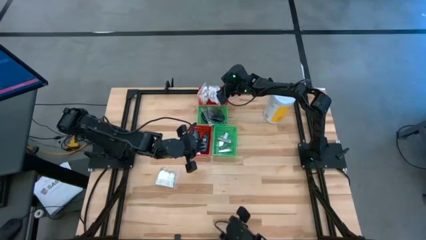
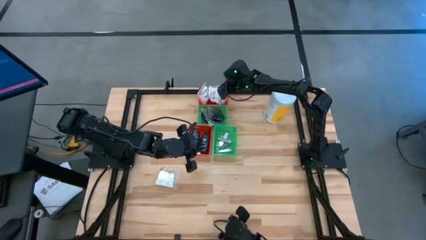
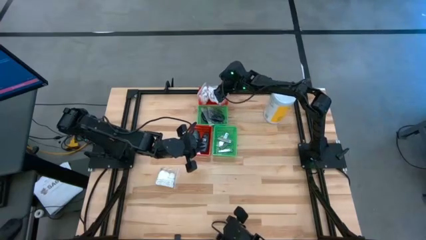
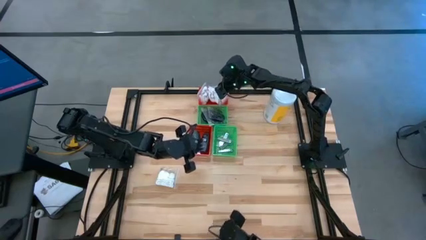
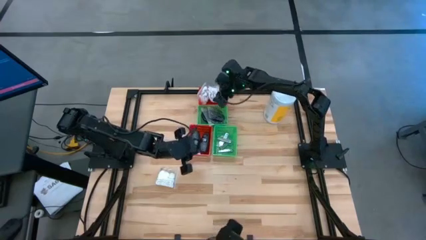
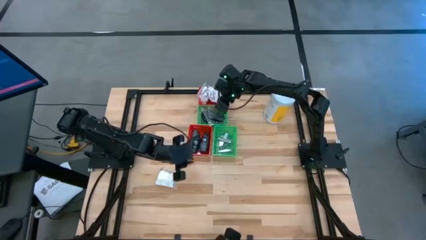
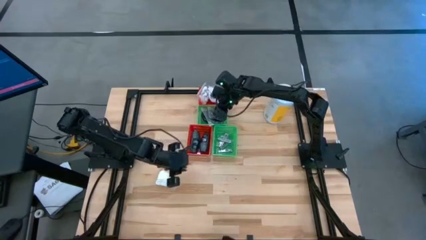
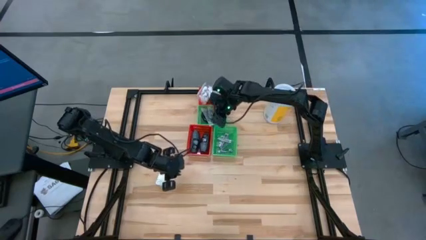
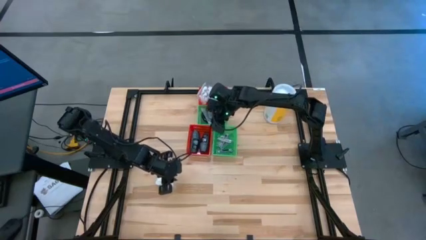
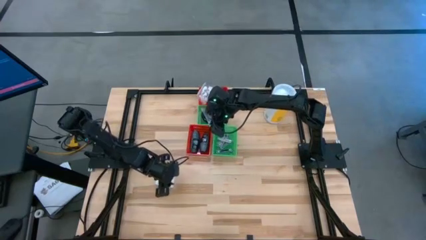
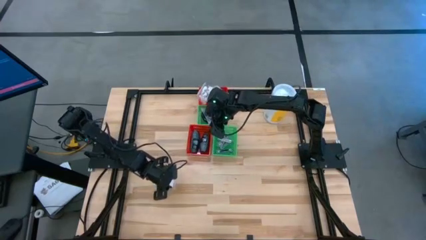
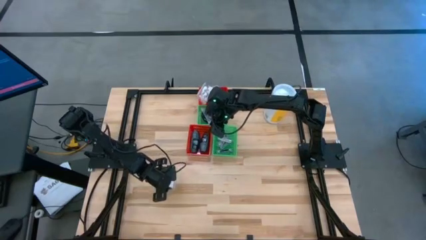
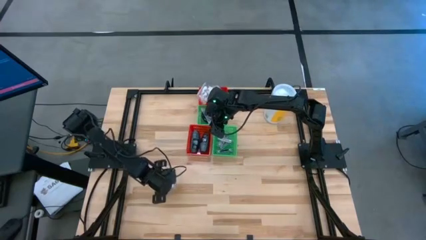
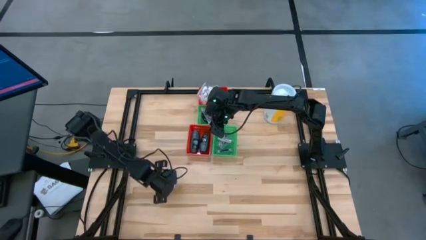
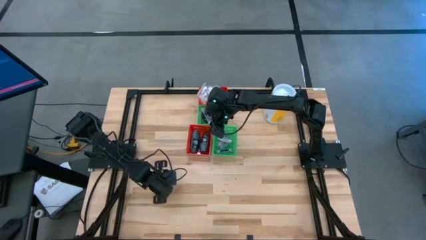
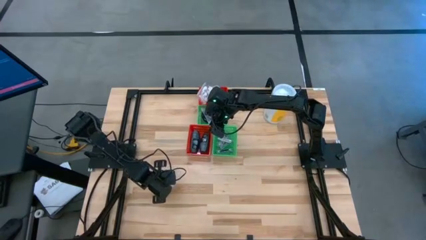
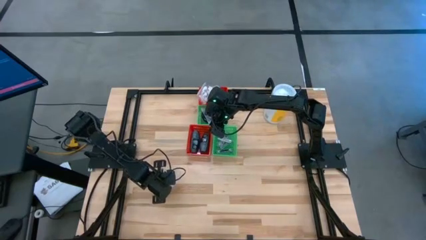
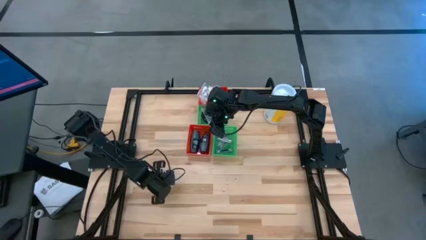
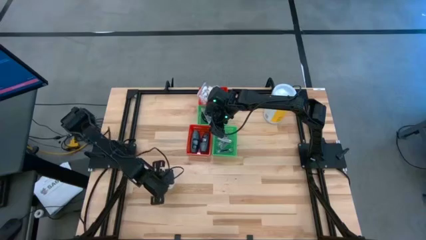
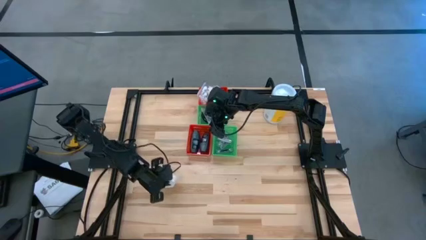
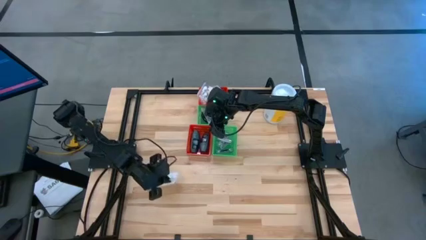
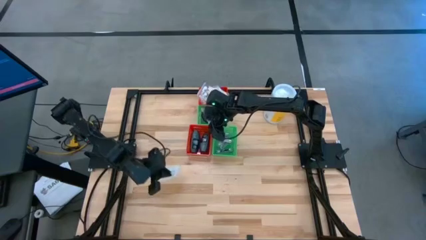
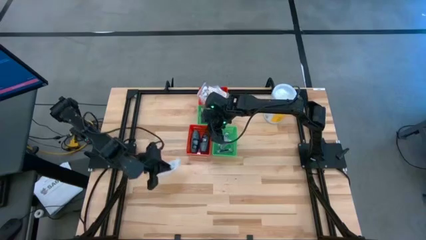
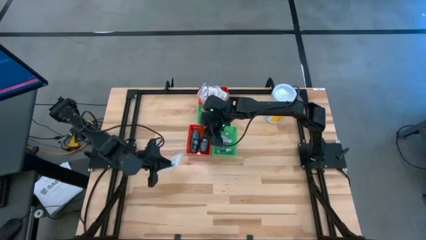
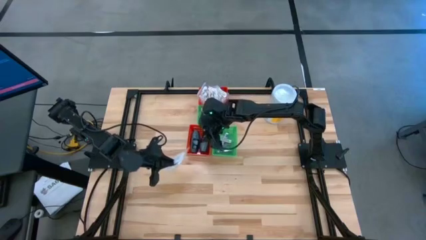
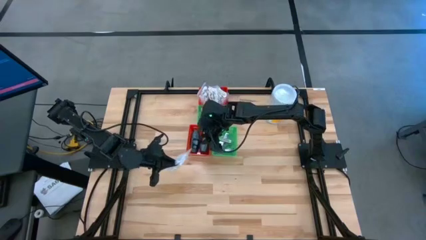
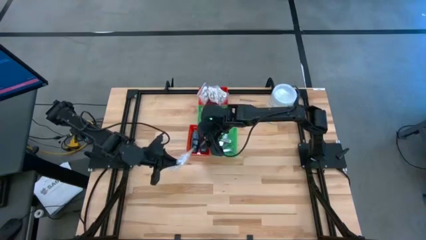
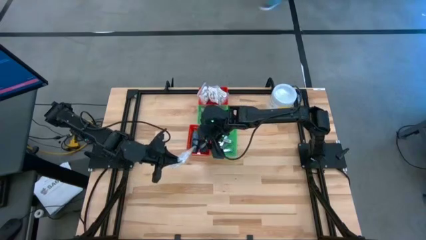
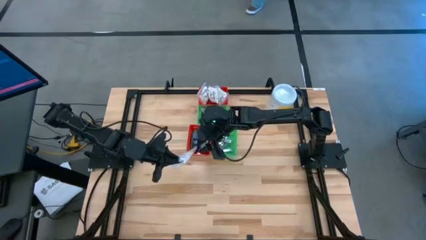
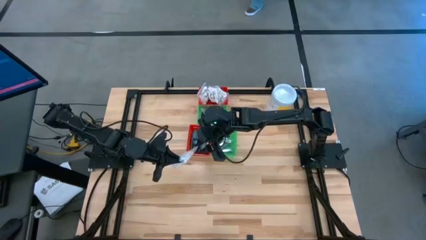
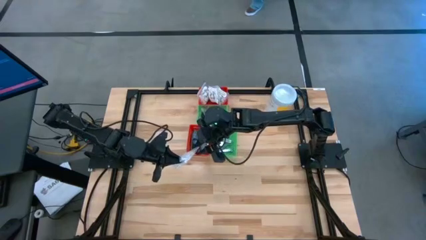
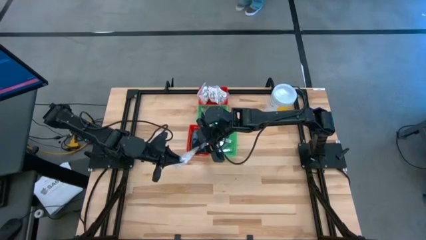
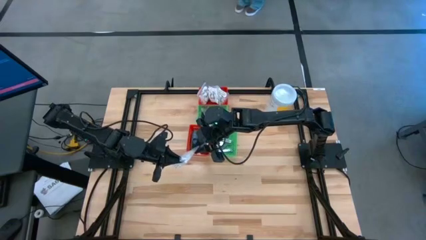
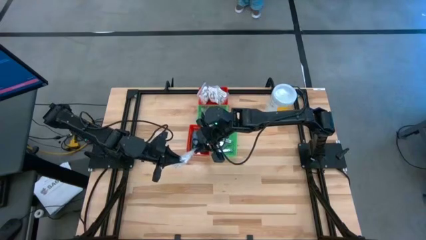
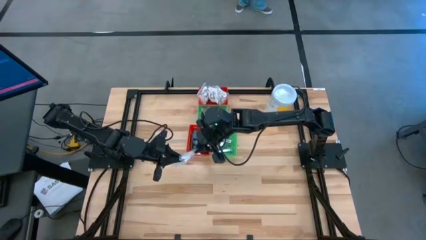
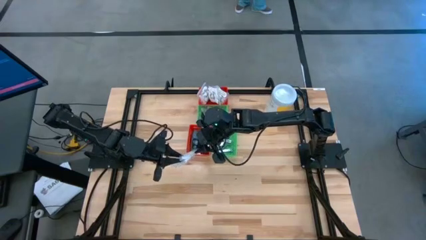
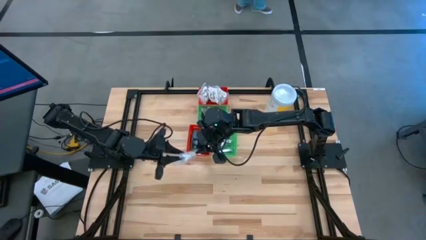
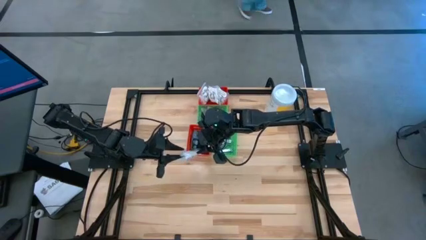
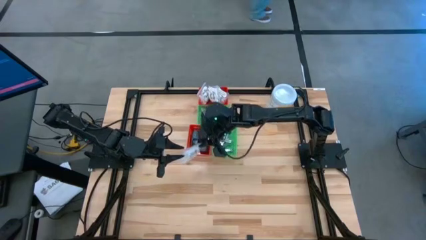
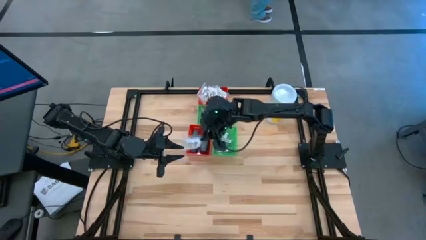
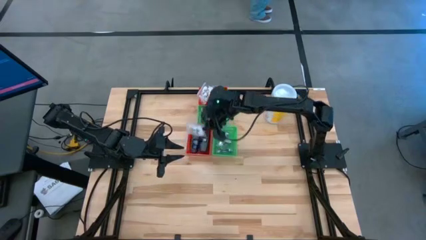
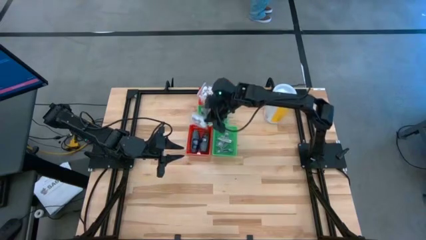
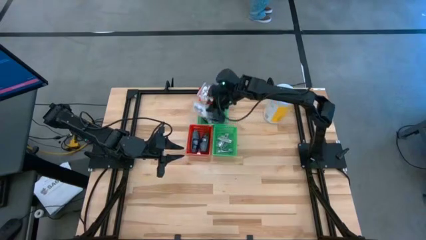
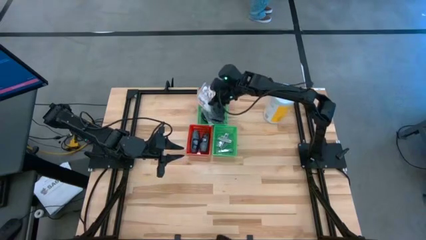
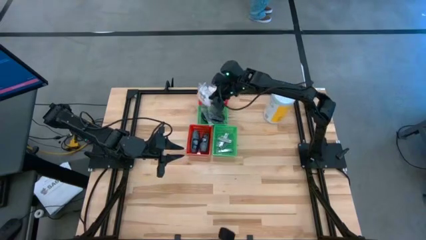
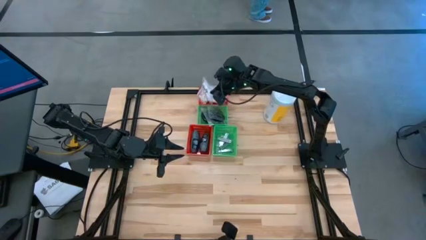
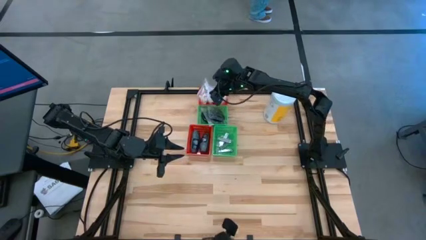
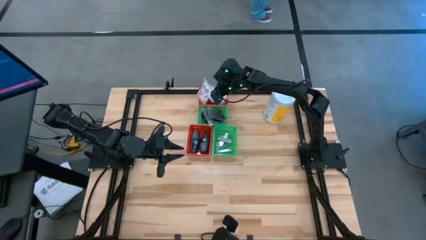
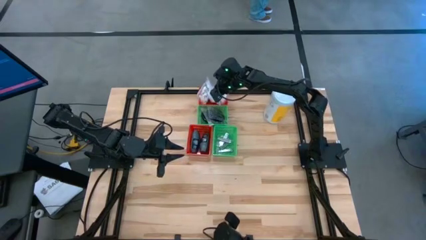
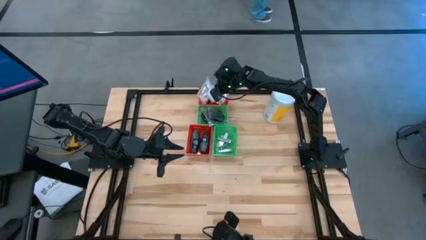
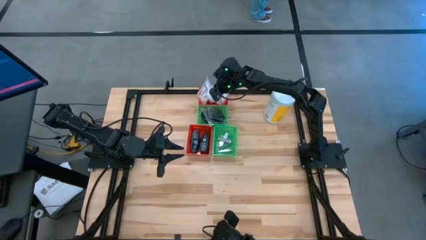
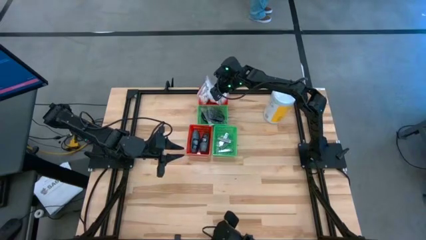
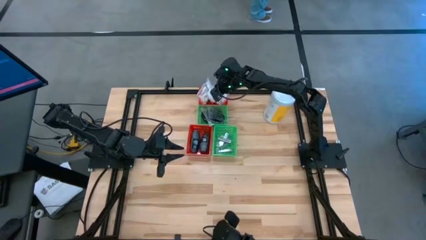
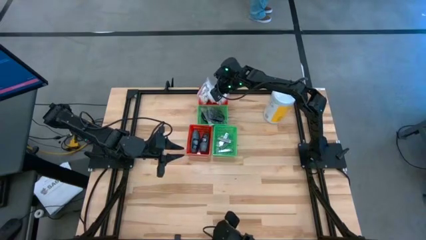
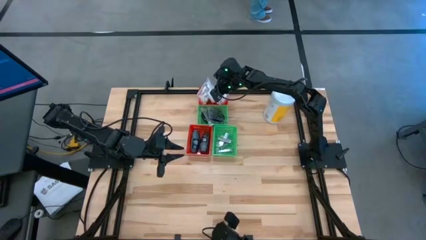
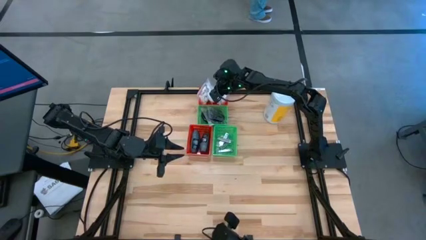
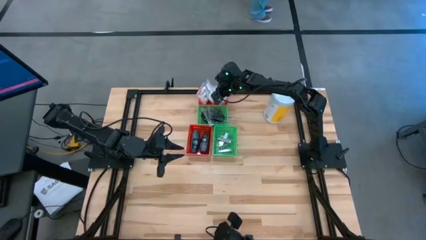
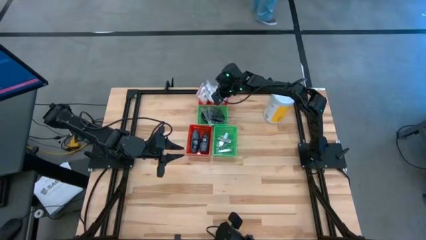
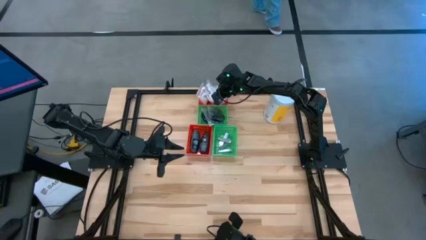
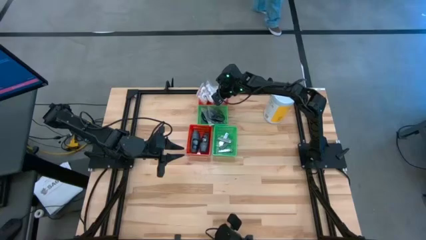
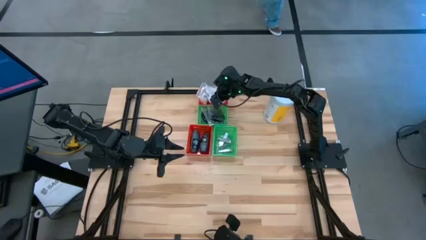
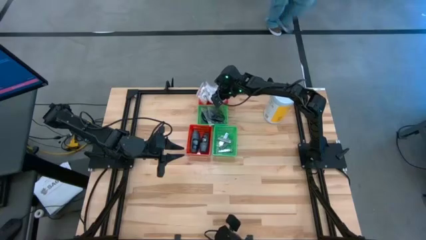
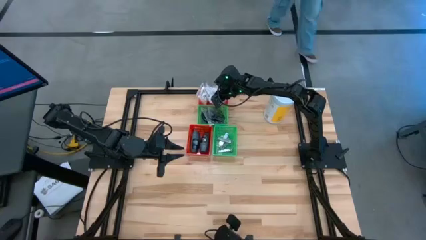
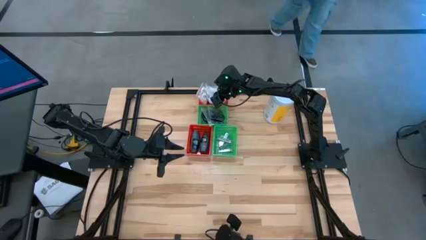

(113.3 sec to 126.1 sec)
Task: Pick & Place Travel size toiletries
Put the white cotton pack into the top red bin

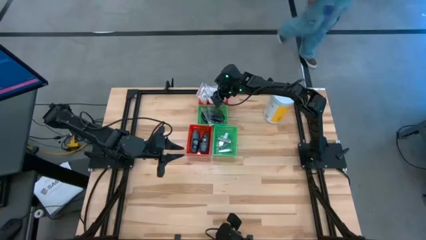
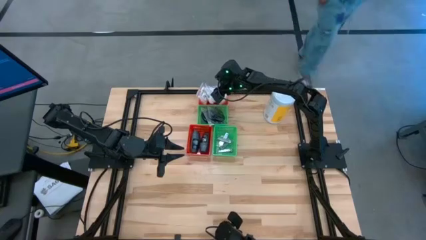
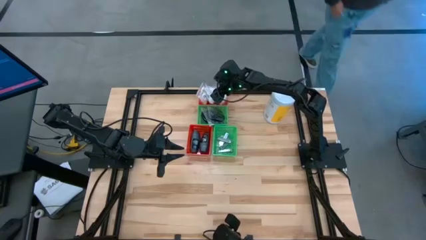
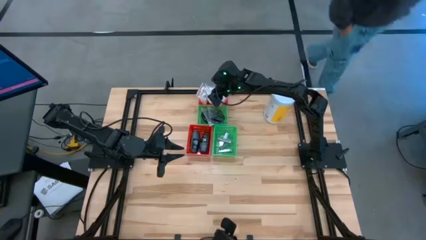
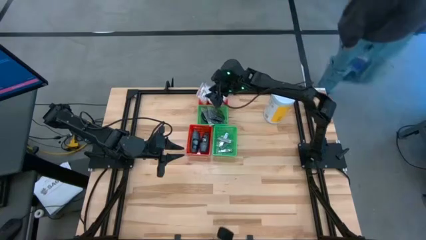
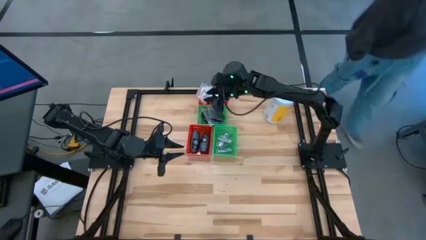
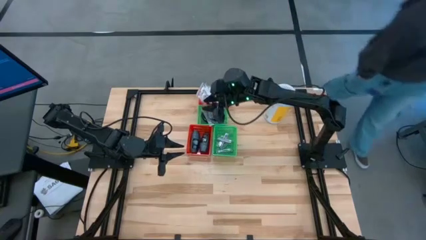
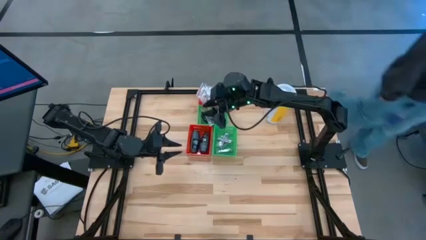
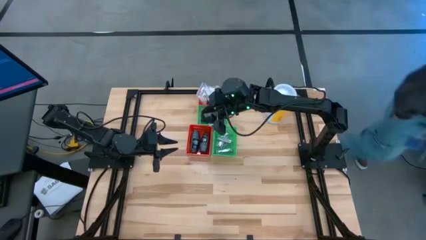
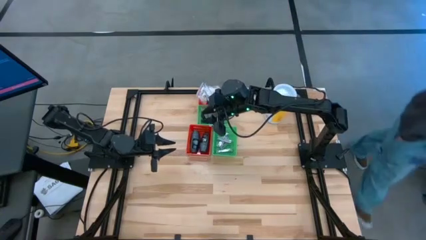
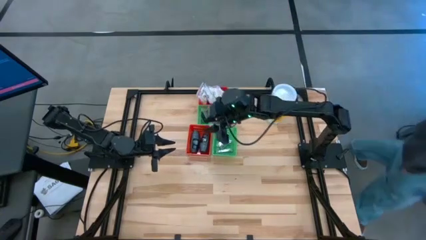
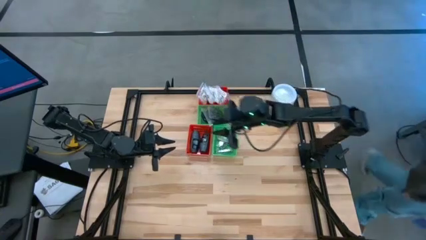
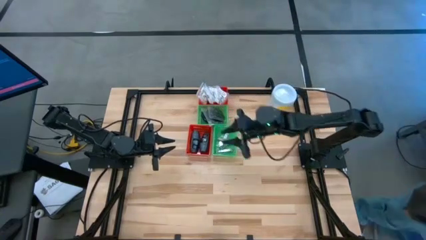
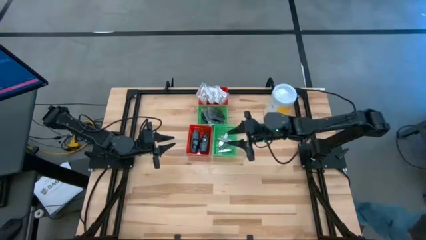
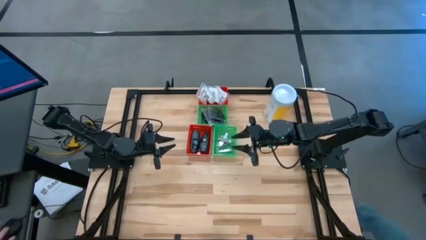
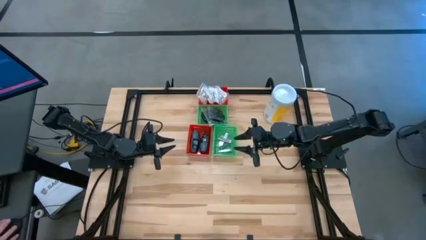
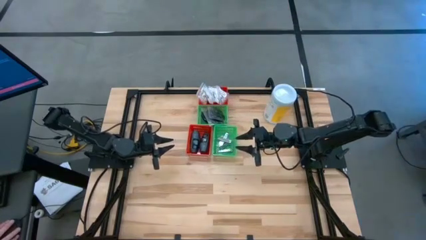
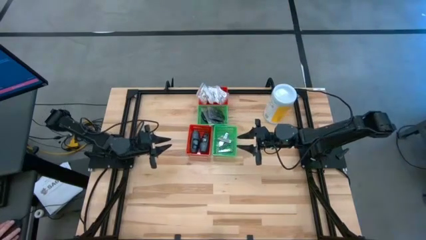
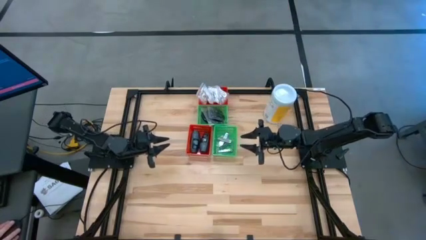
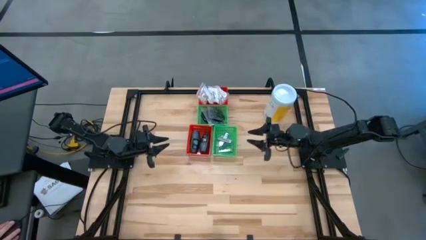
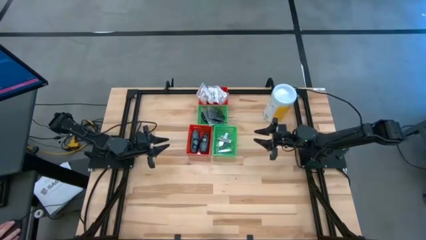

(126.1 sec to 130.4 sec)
Return to Home Position
